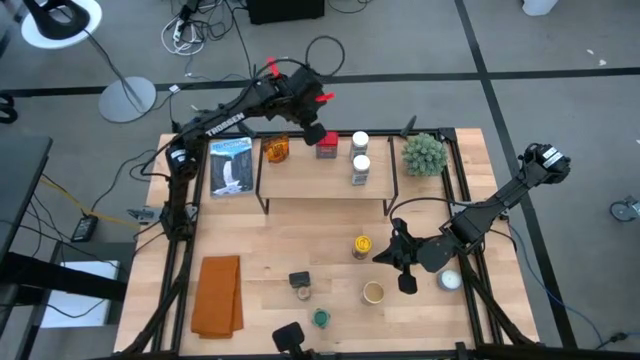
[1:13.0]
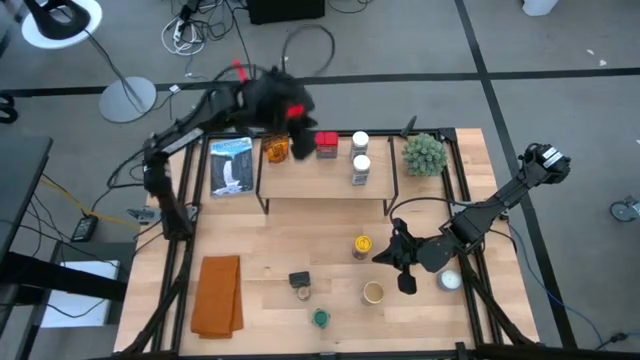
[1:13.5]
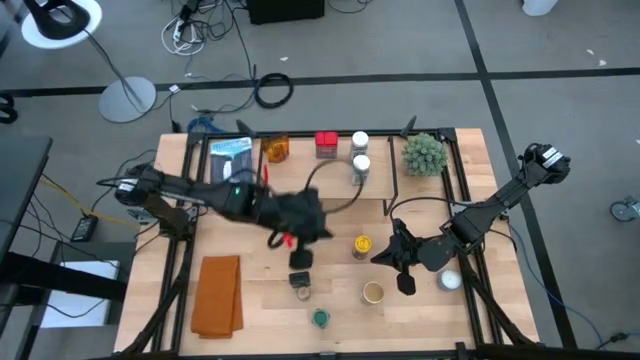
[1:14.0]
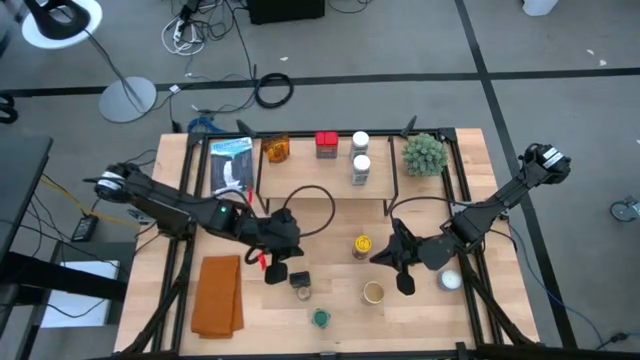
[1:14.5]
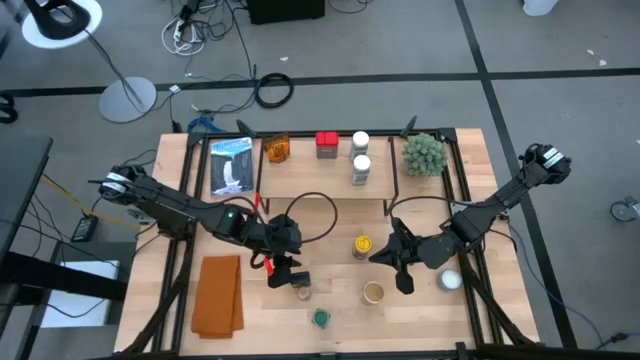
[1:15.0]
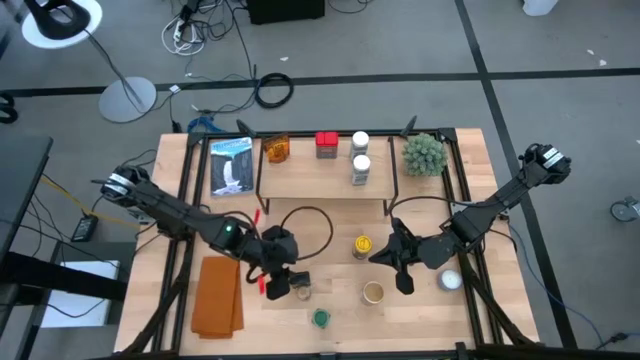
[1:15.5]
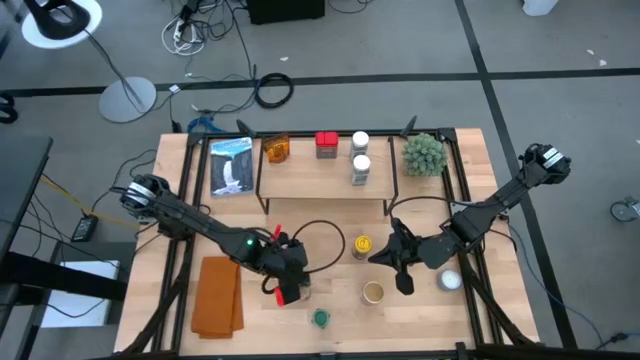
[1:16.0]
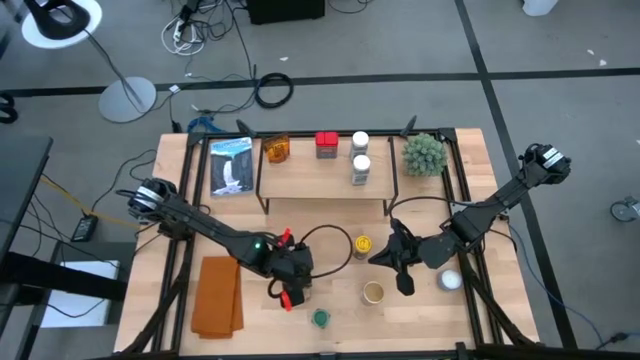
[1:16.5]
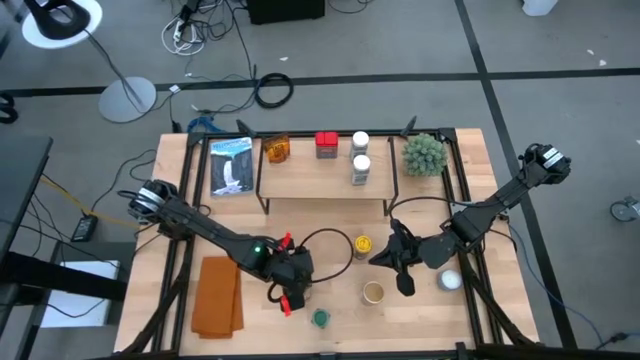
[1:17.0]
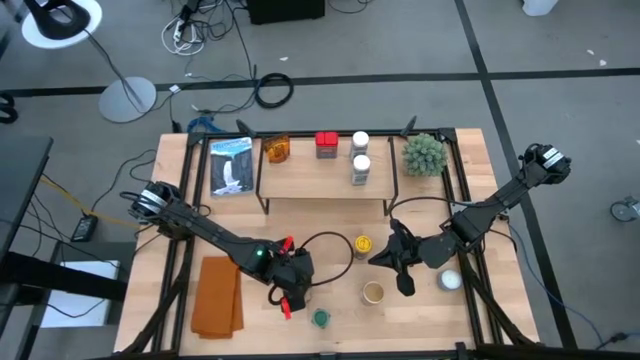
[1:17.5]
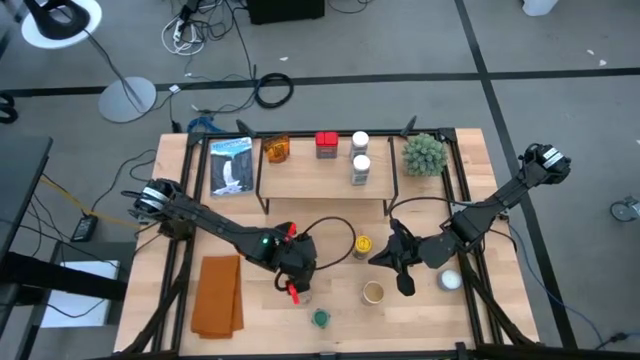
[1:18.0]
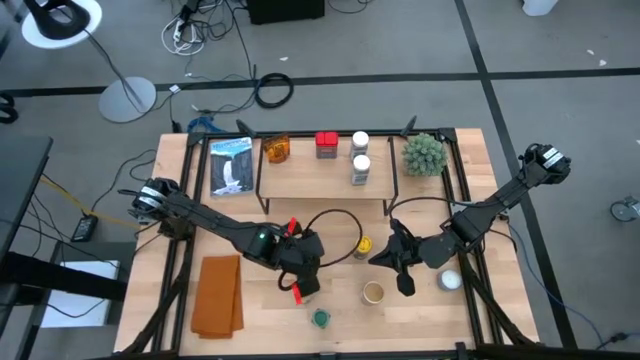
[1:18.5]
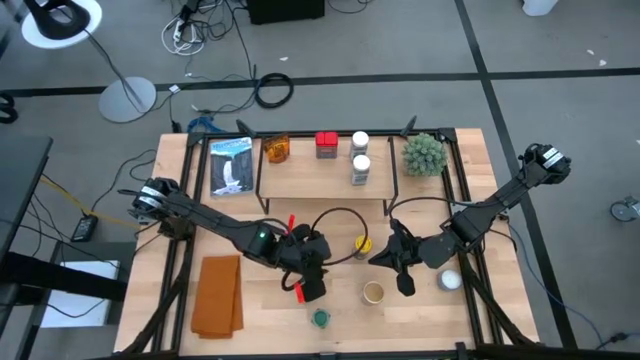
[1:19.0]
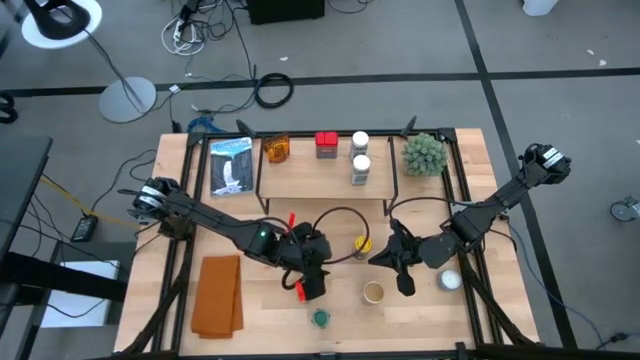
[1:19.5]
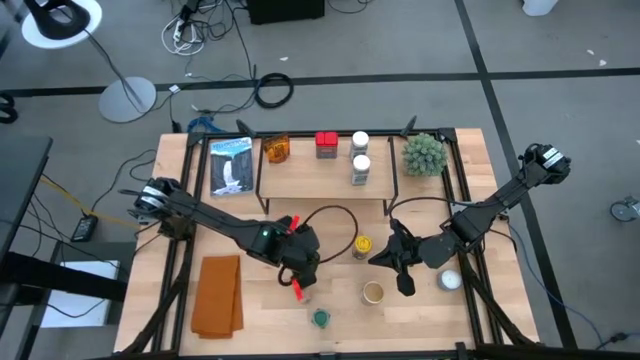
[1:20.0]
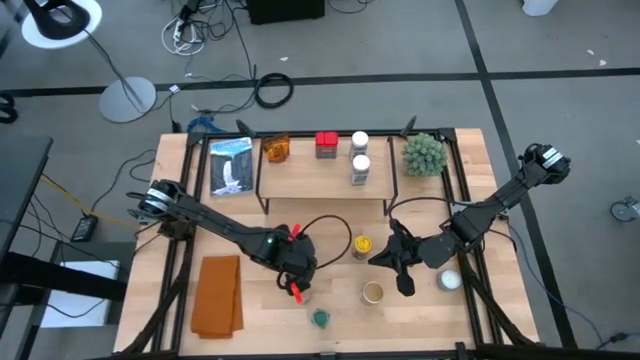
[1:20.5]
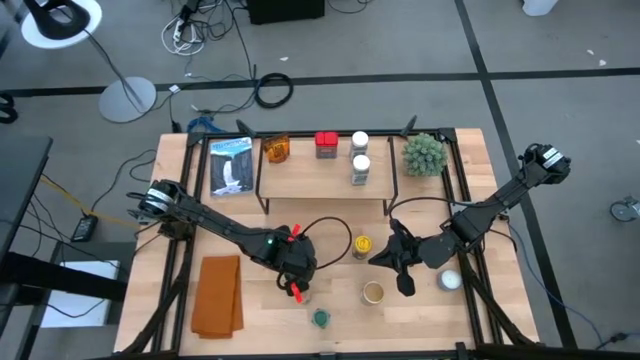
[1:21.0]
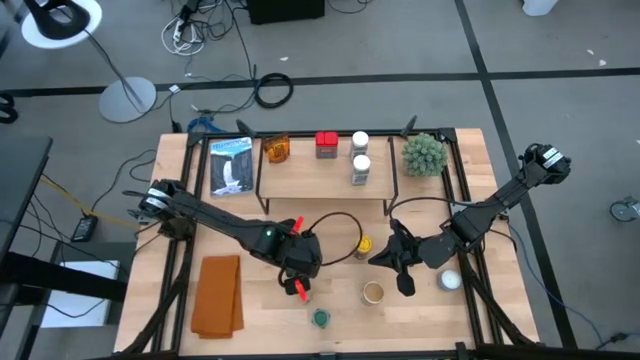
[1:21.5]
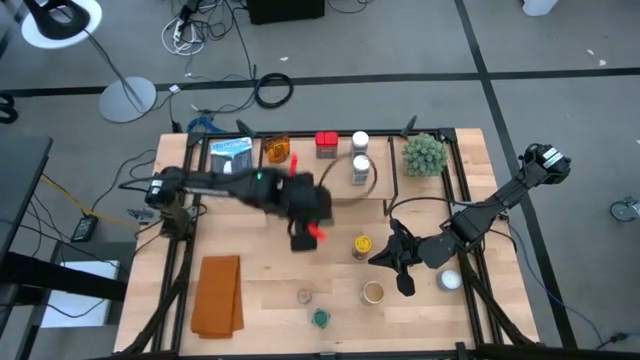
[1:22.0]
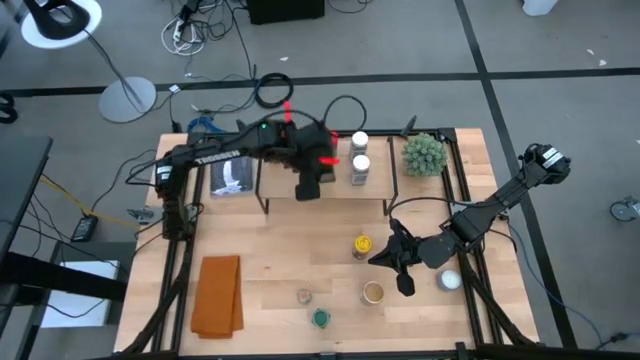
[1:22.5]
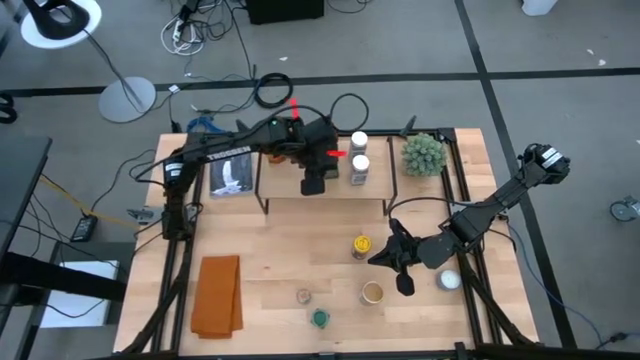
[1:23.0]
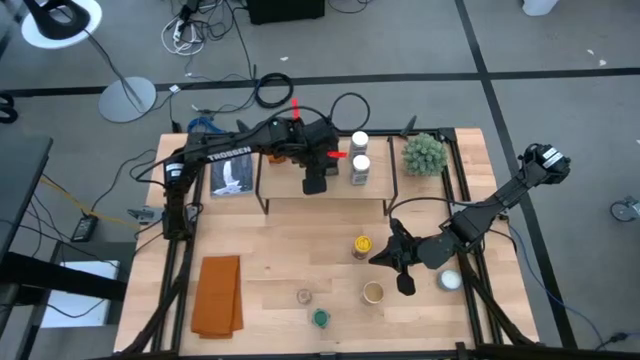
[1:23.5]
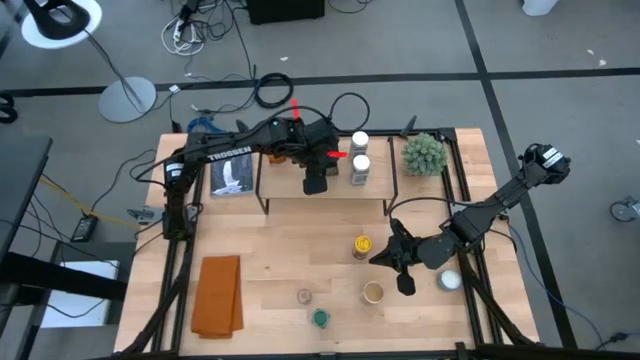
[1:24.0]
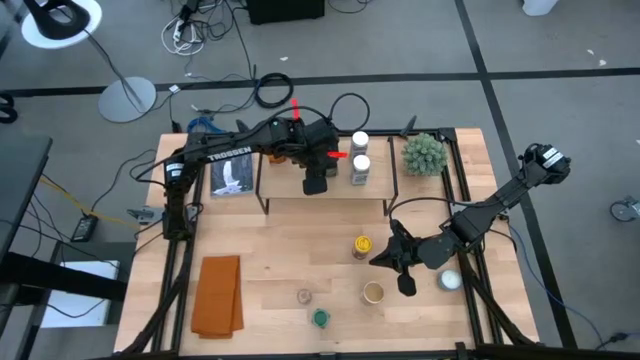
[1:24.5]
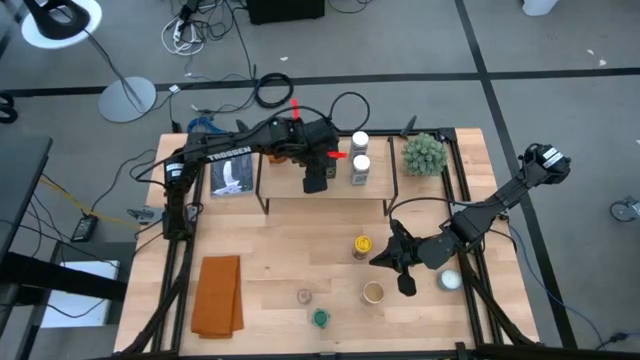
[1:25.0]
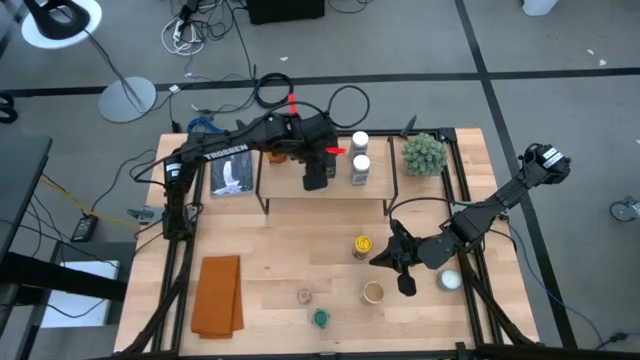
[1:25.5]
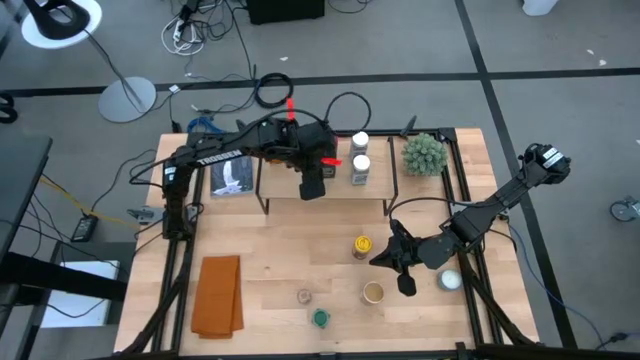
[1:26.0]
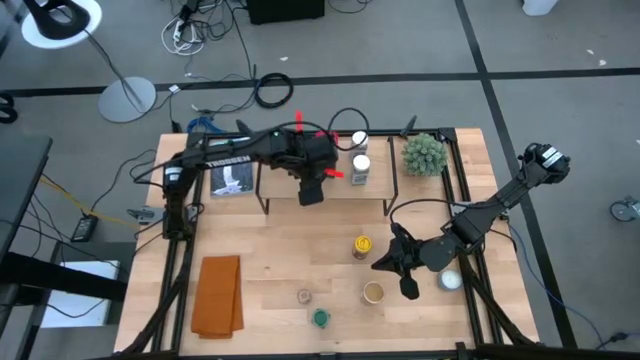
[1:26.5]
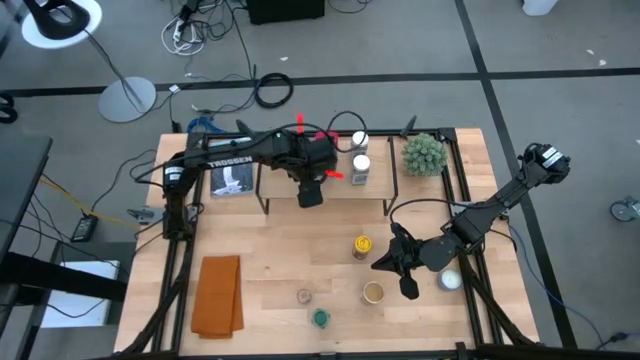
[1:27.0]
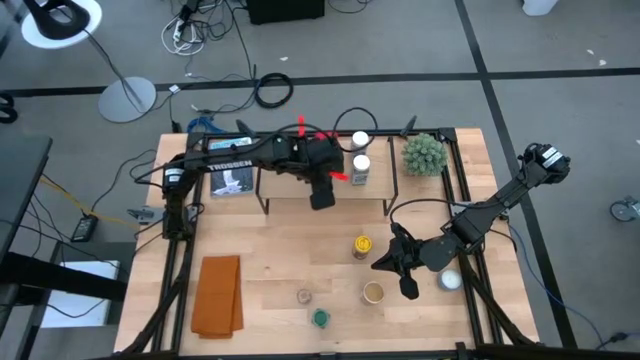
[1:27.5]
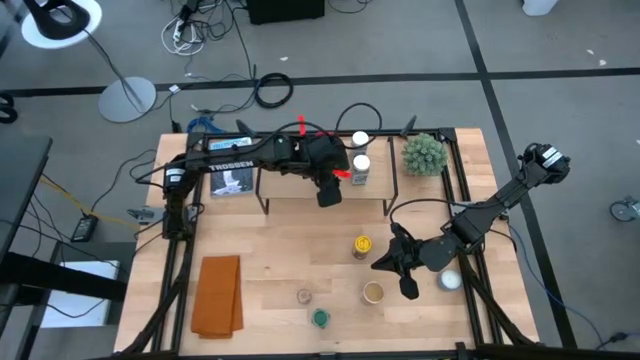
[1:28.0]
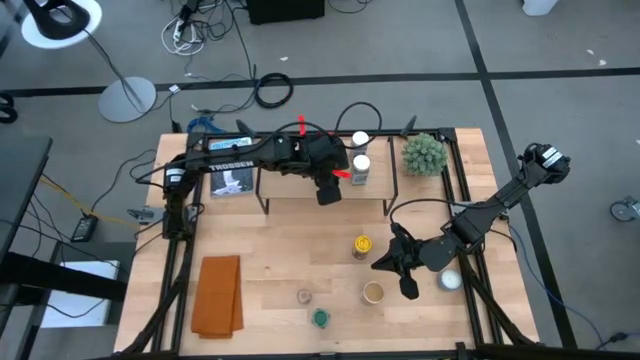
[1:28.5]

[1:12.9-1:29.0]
Task: Shelf spices
Put the black seasoning can on the shelf

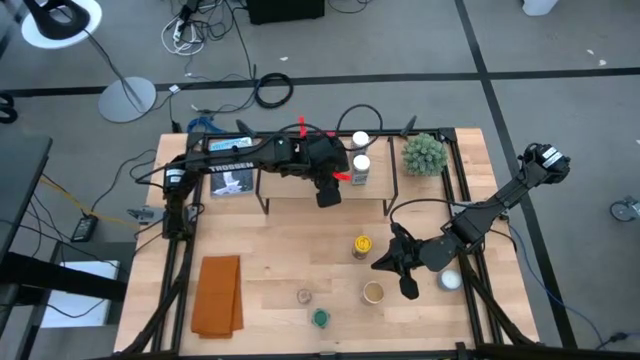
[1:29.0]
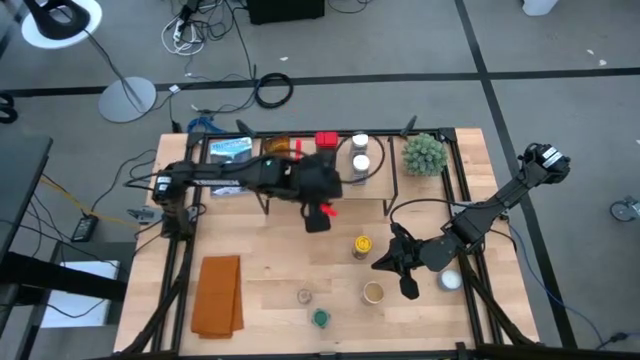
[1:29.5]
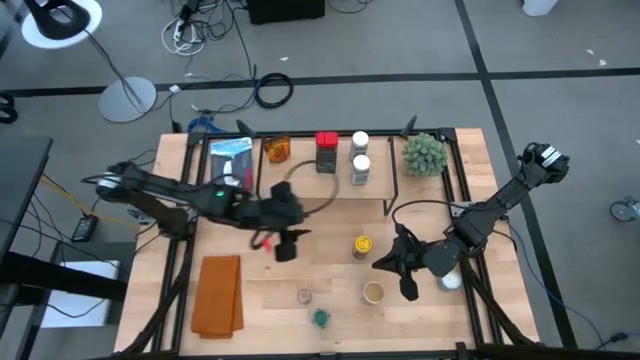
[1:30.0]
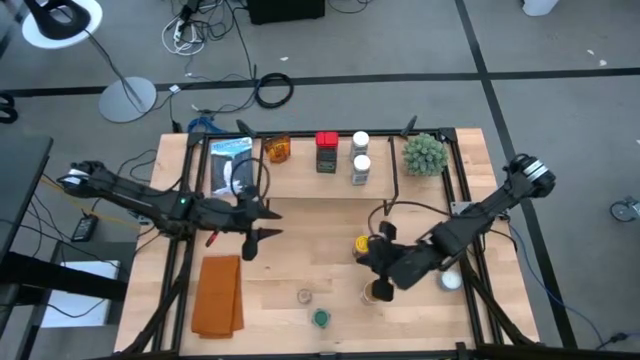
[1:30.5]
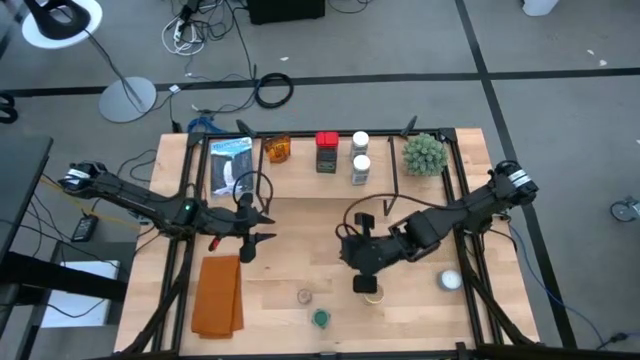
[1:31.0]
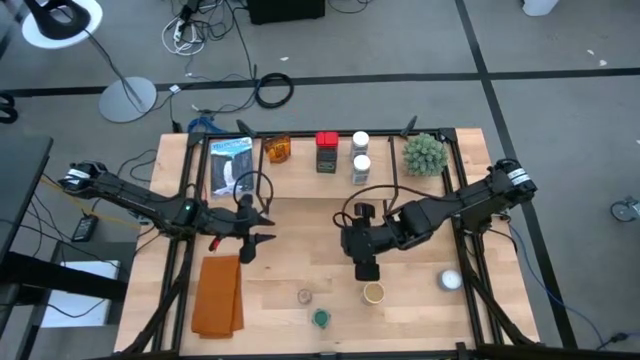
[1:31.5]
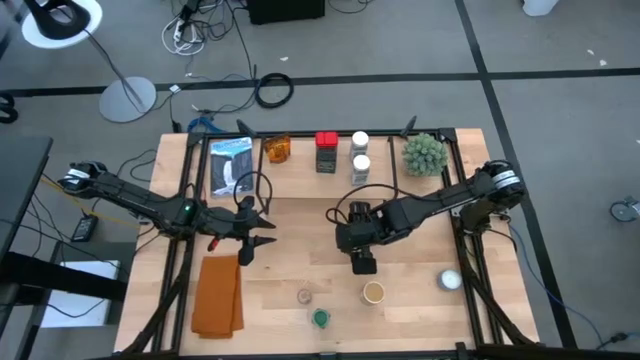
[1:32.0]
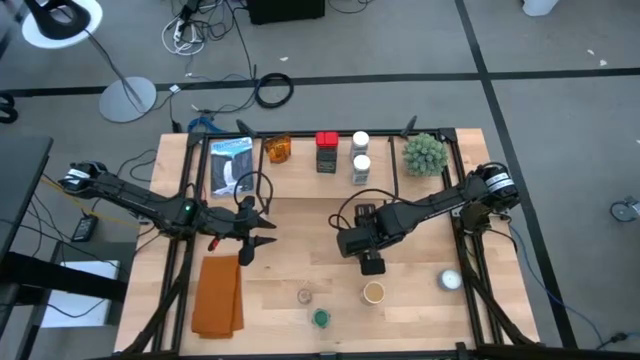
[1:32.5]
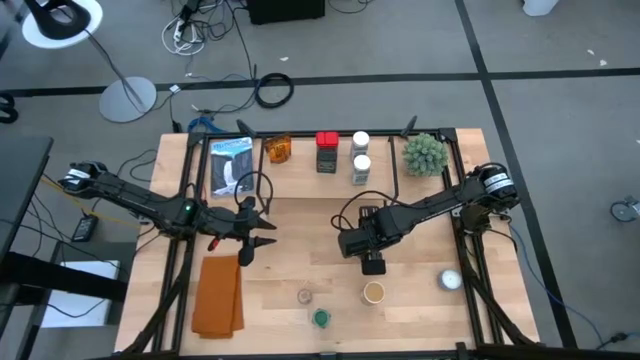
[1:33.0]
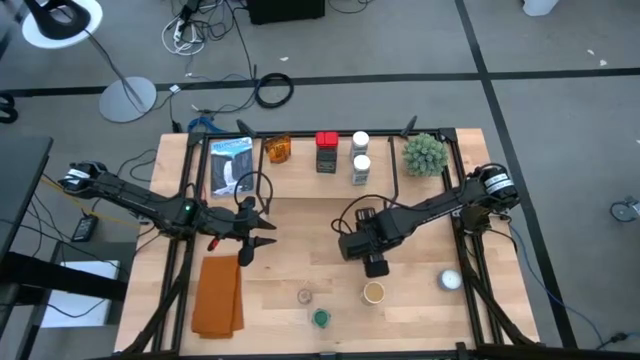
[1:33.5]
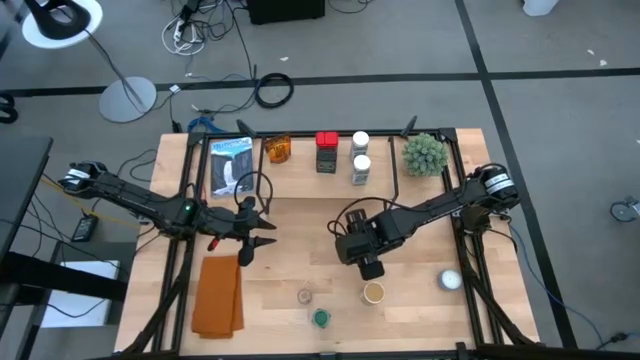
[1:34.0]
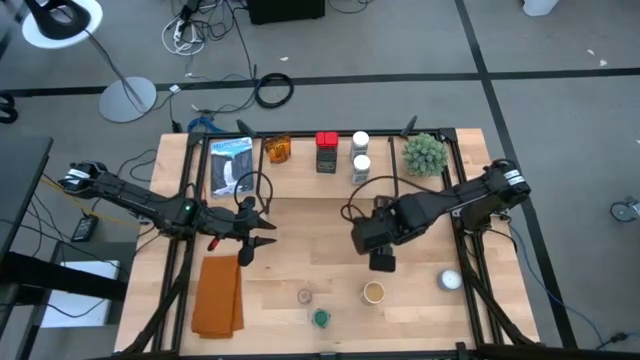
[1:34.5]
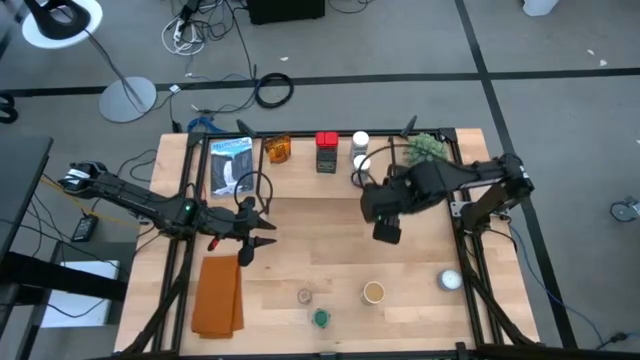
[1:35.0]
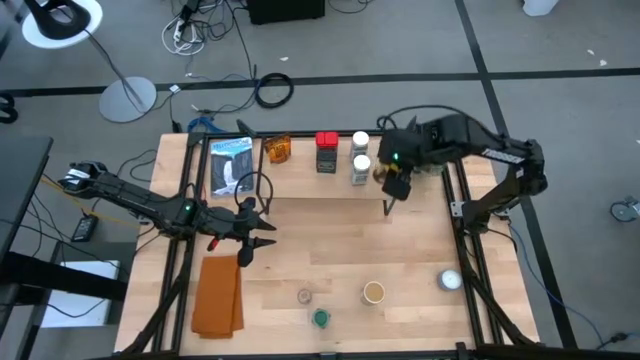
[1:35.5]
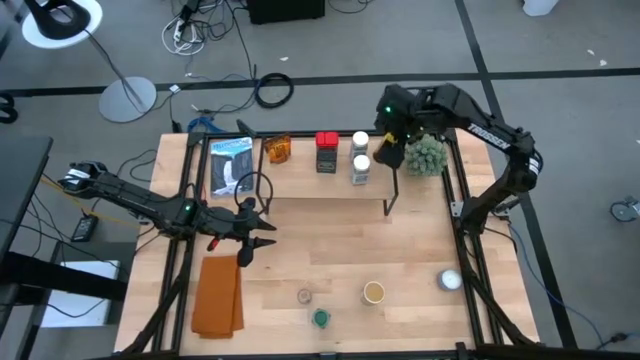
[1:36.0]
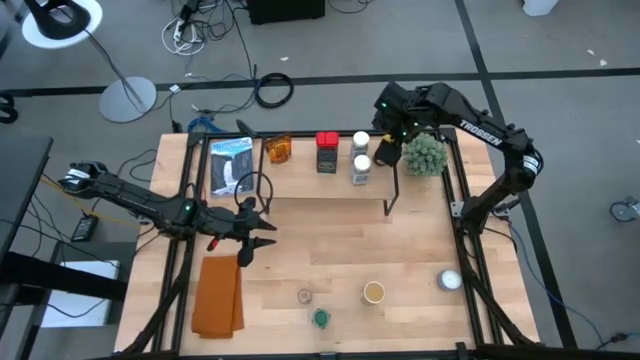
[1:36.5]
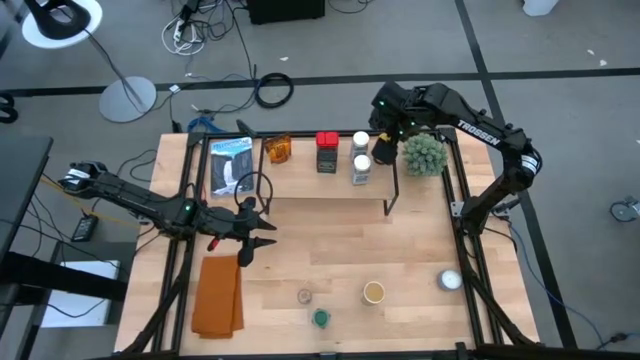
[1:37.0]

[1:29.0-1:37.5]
Put the yellow seasoning bottle on the shelf
